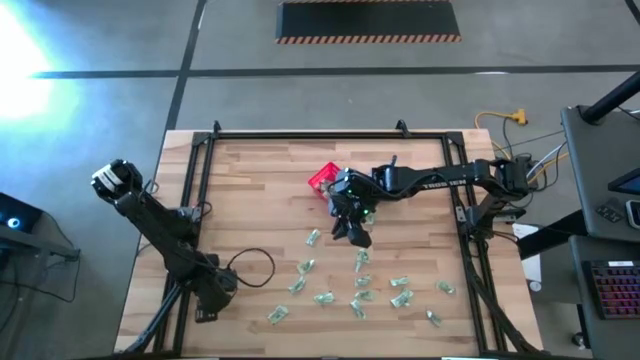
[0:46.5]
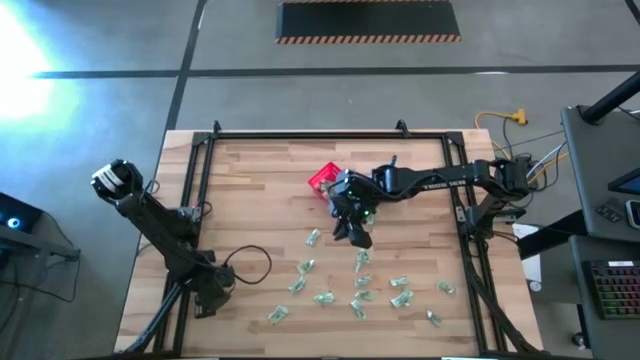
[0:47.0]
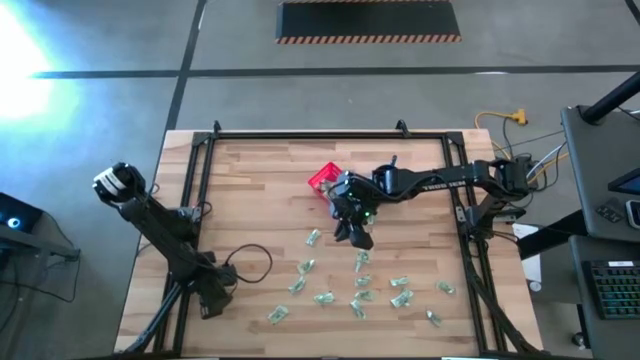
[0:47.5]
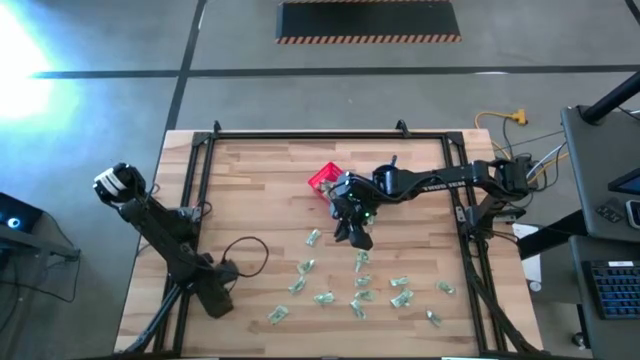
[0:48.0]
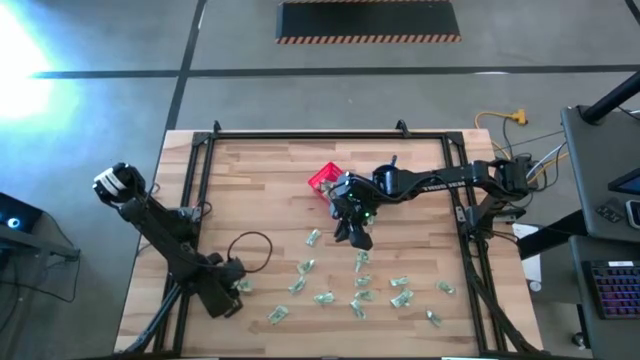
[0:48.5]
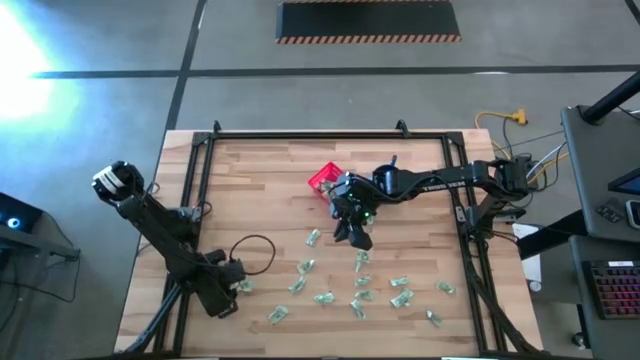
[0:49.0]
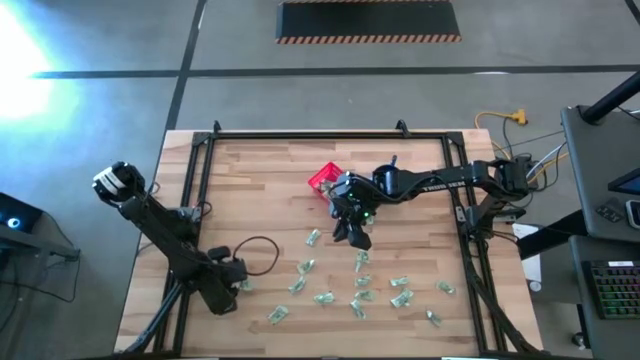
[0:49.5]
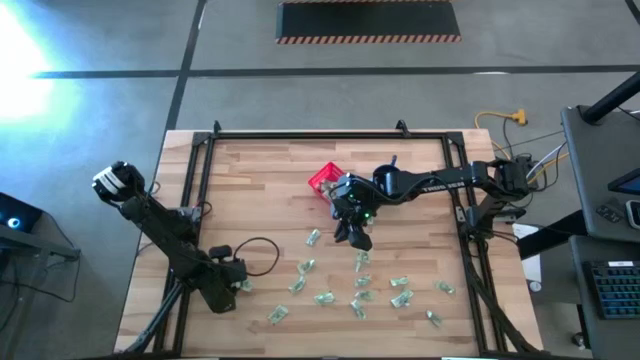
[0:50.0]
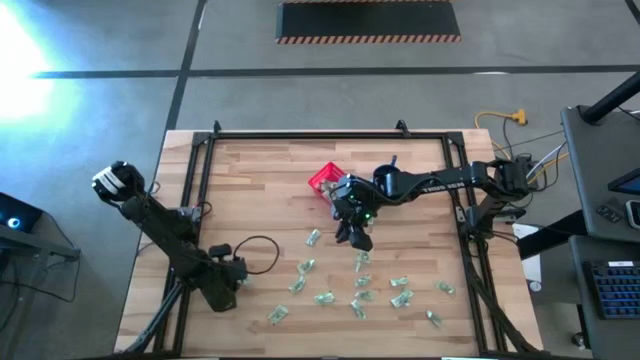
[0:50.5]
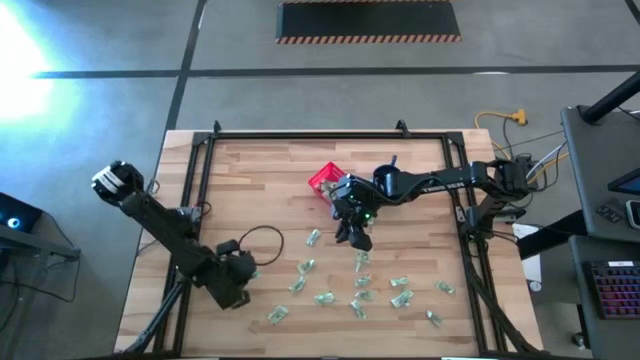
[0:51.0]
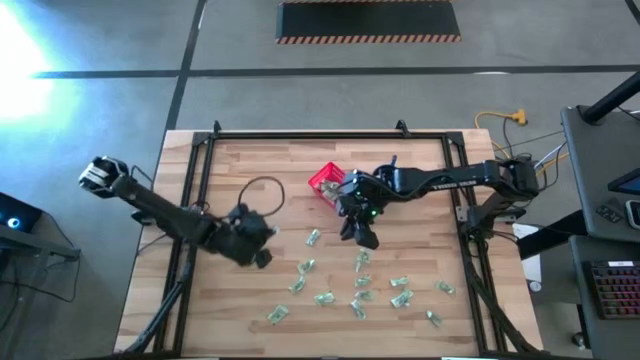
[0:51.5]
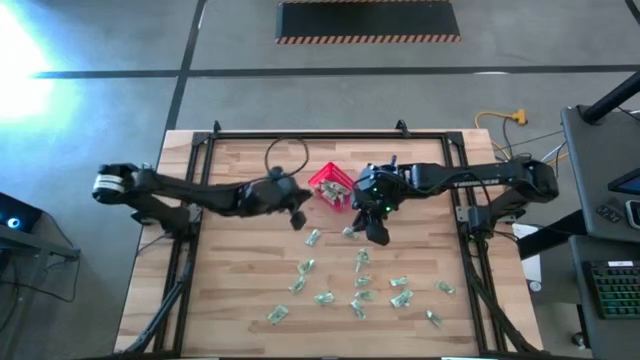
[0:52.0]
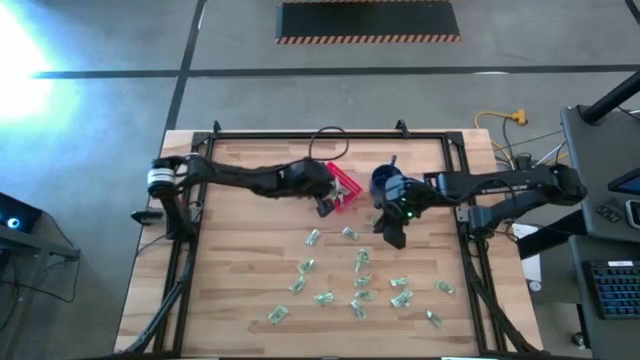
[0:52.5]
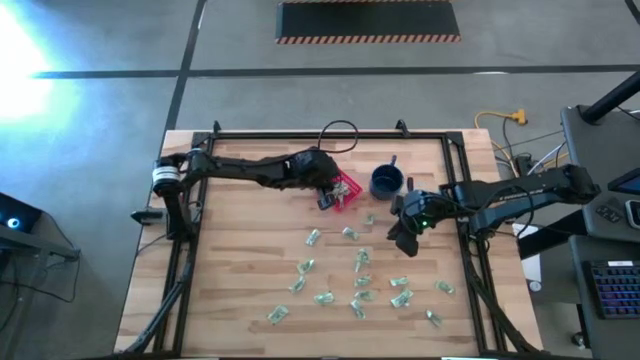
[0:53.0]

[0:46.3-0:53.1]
Task: Pick and place Stevia / Truvia into bins
Put the stevia packet into the red basket

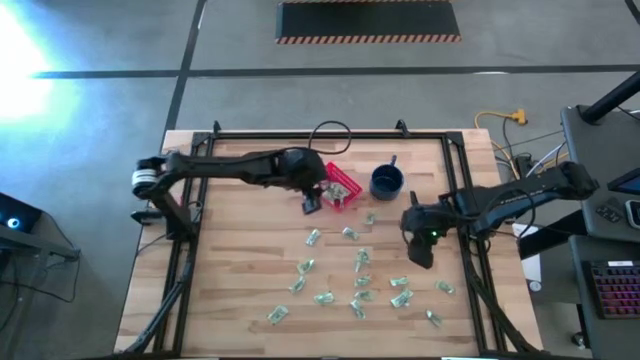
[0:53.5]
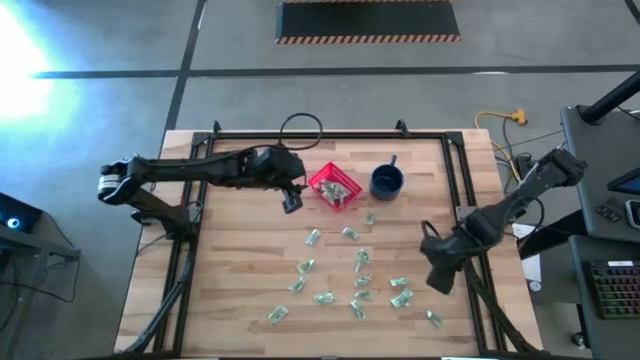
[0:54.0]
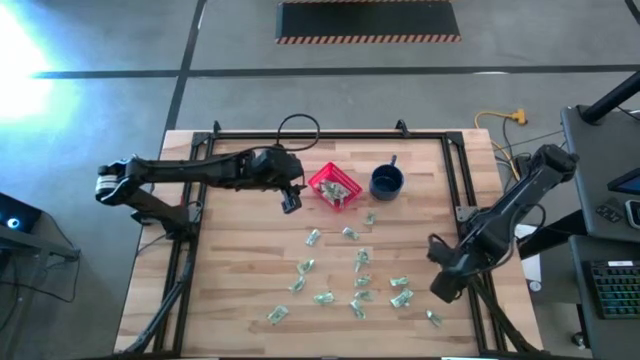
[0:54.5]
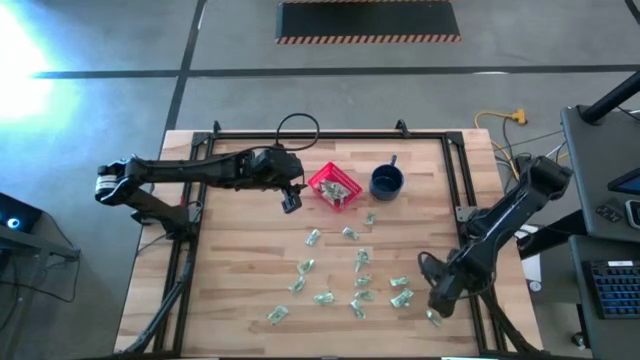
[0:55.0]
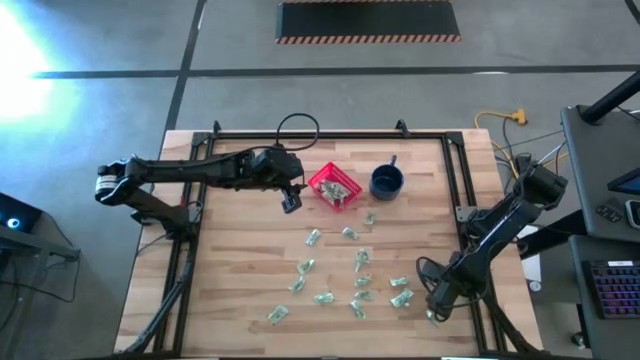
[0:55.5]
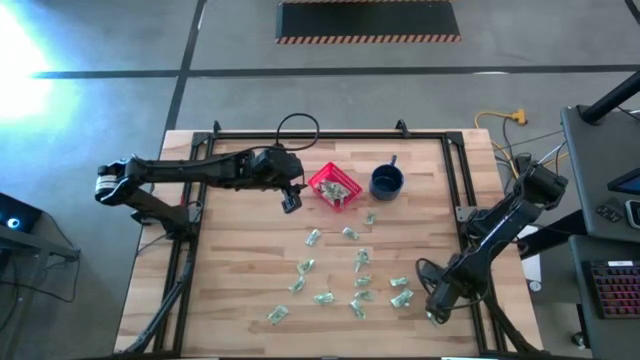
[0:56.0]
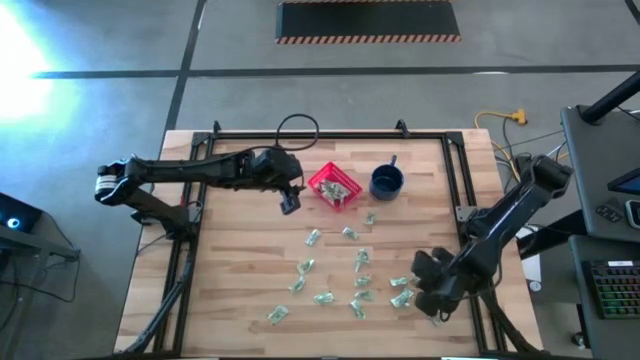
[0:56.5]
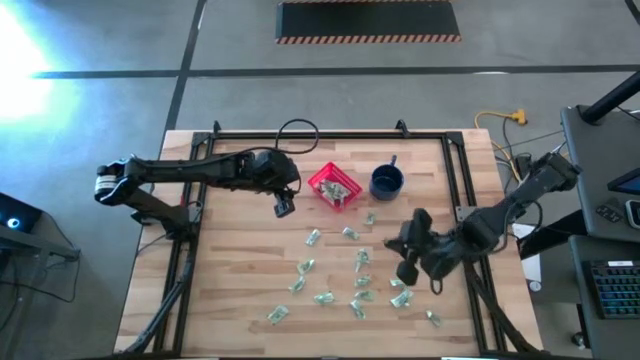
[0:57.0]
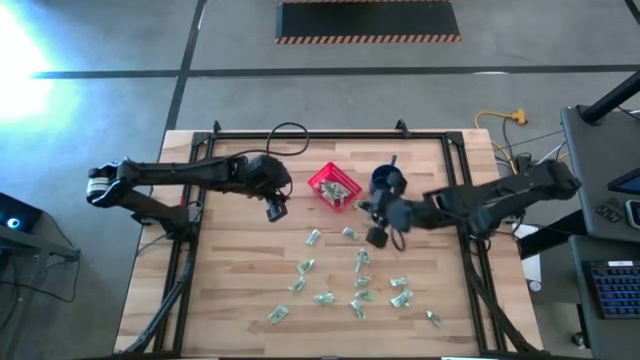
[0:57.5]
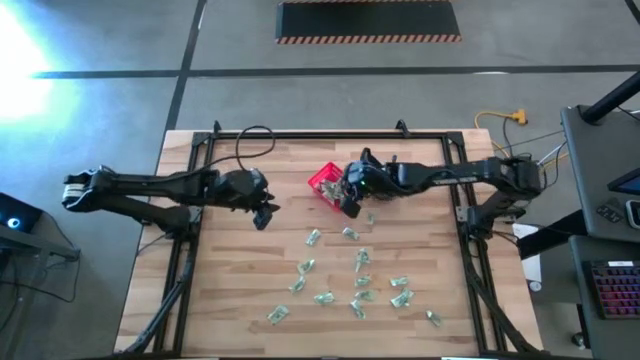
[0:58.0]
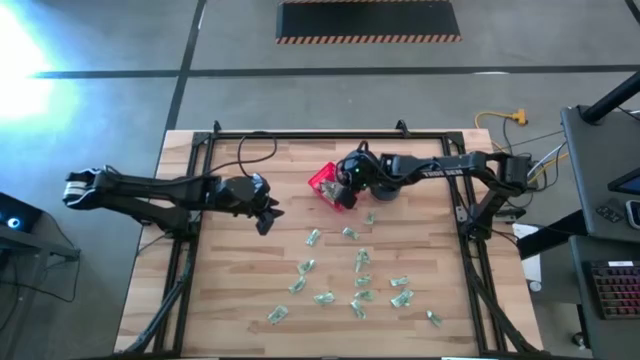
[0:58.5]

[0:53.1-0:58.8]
Put the stevia packet into the red basket

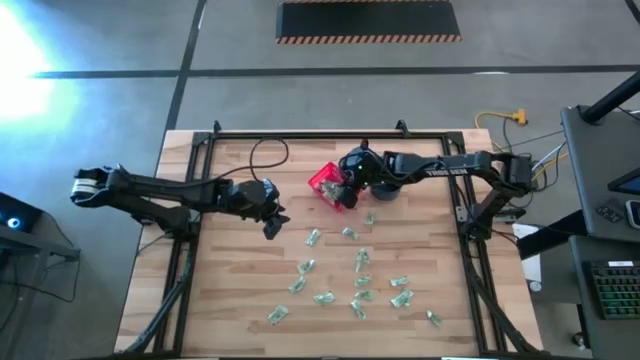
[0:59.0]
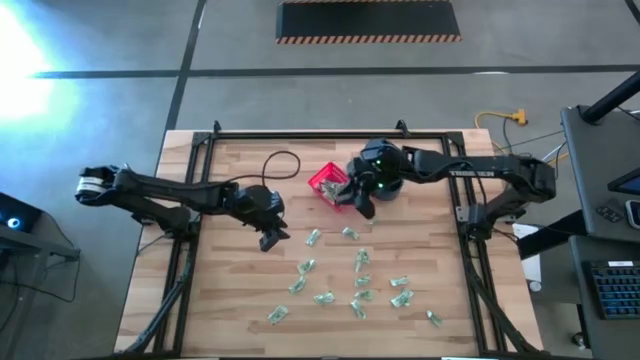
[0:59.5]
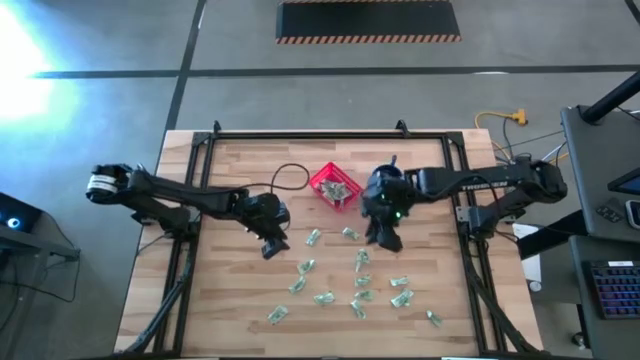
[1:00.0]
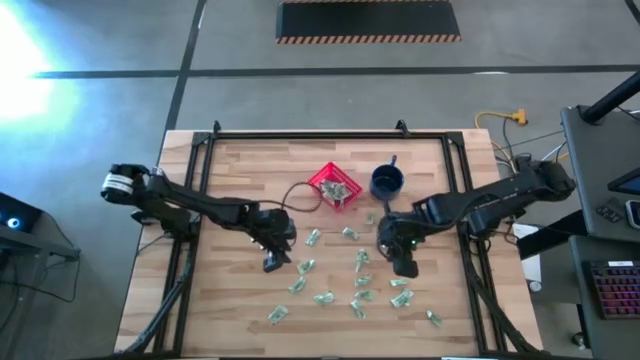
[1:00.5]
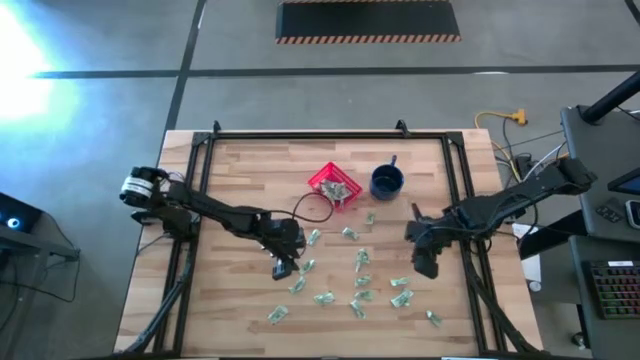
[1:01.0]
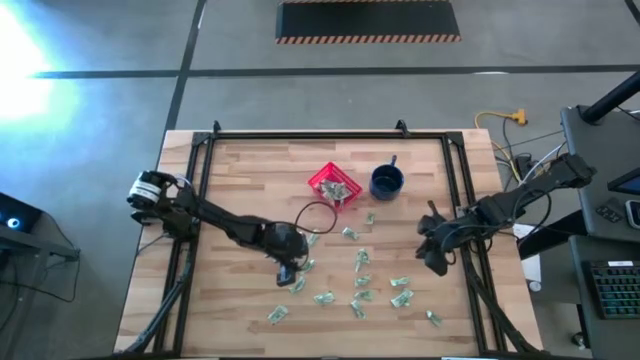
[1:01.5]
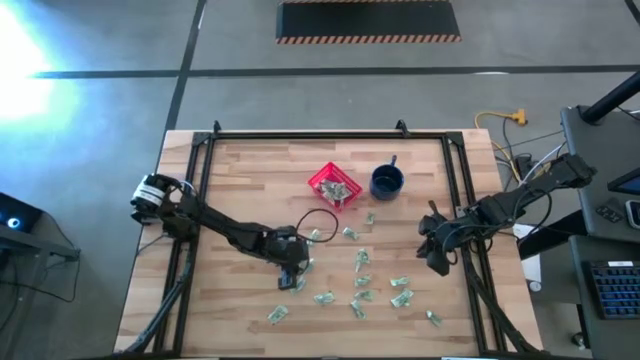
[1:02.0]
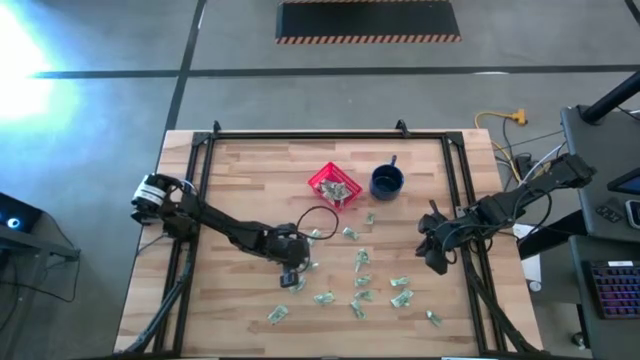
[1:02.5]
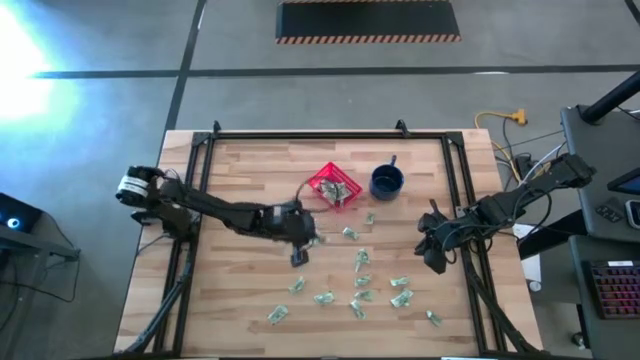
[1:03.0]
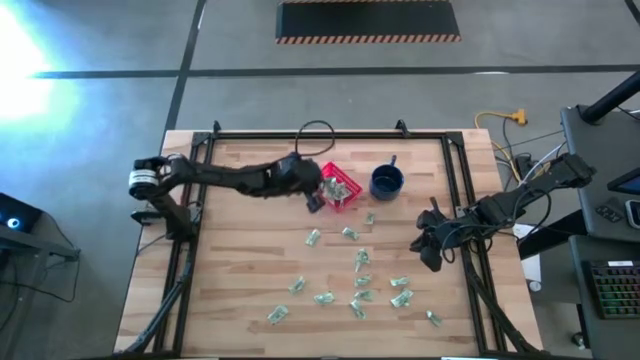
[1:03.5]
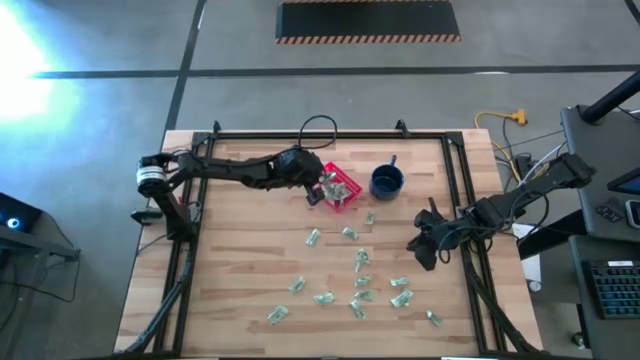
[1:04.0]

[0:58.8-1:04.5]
Put the stevia packet into the red basket

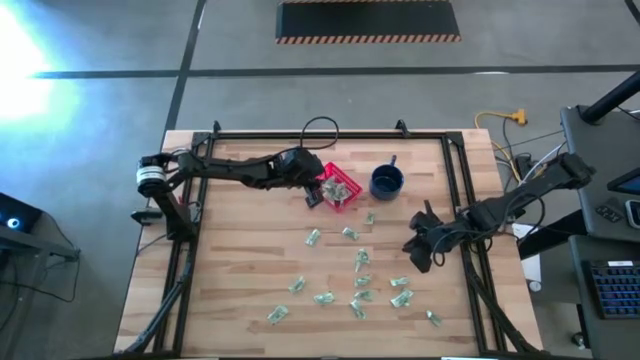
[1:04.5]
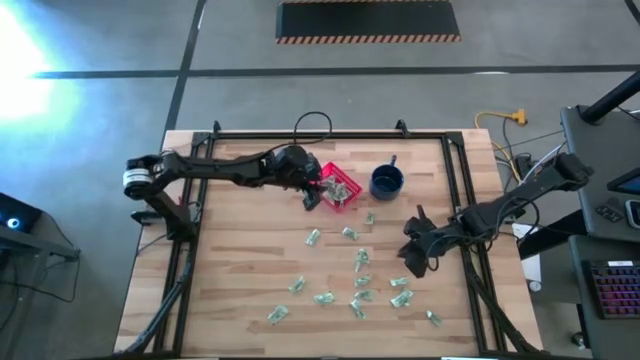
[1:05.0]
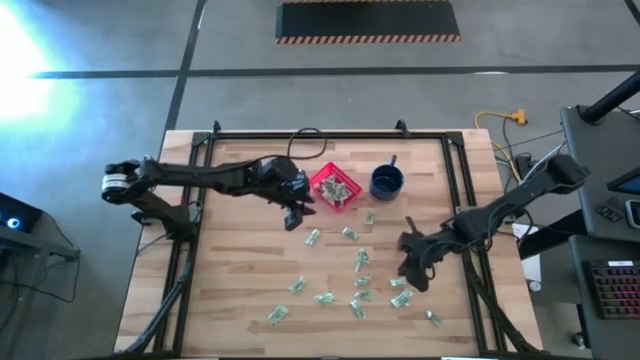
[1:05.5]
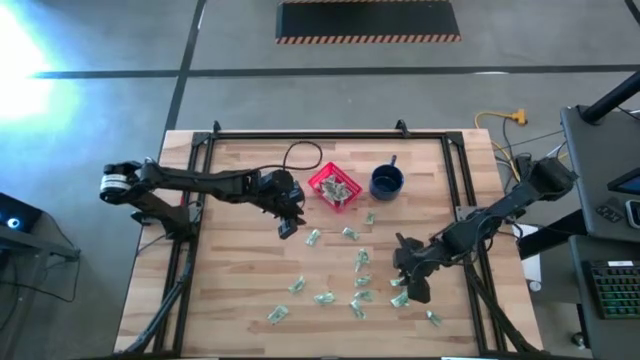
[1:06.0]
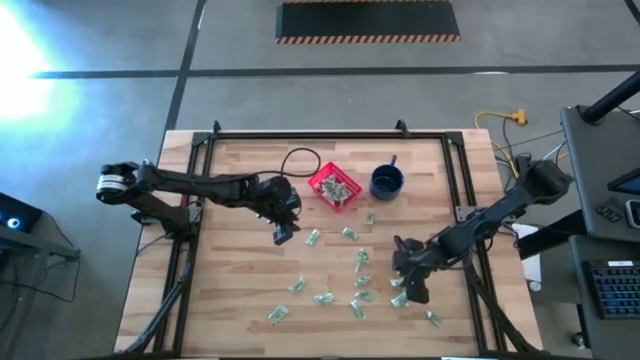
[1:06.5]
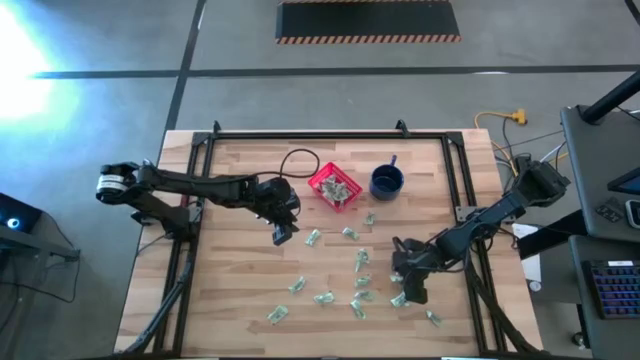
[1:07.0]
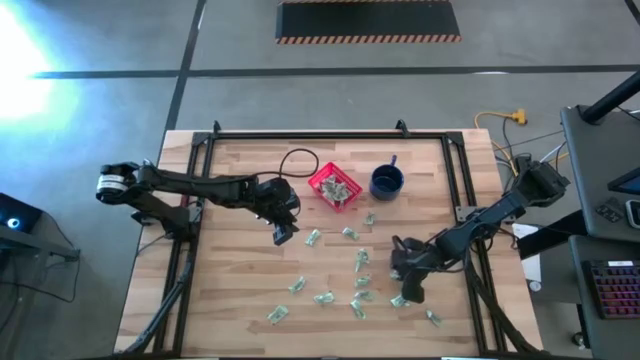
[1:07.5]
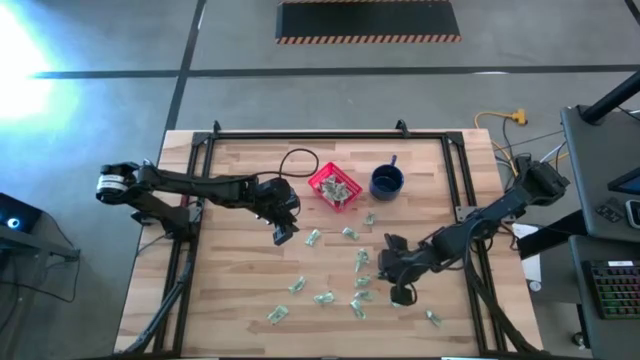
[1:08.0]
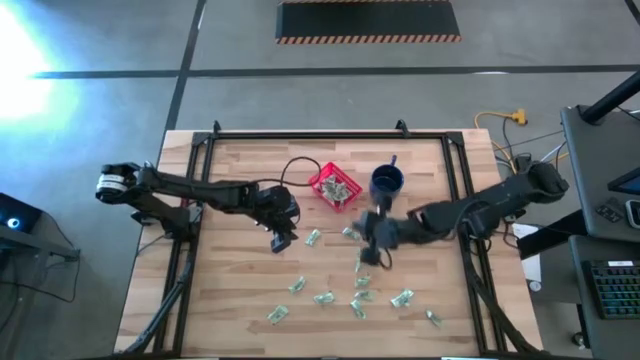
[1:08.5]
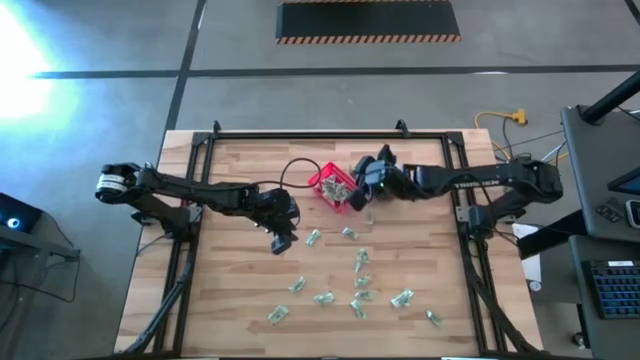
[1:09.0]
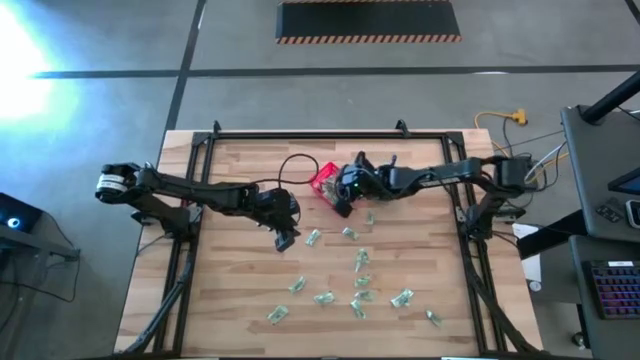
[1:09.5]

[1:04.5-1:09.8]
Put the stevia packet into the red basket
